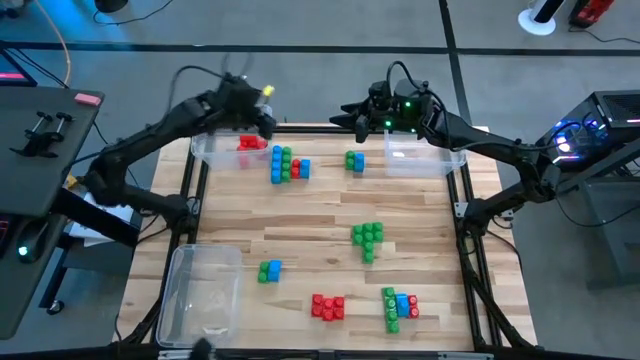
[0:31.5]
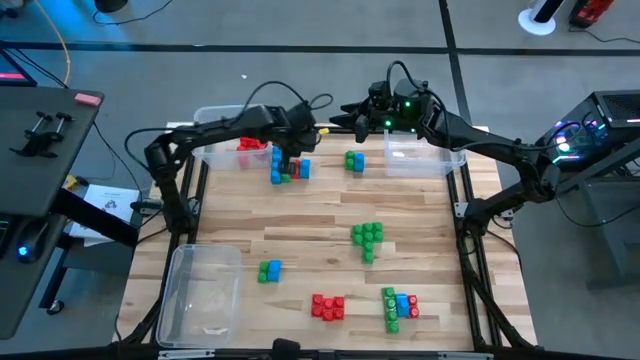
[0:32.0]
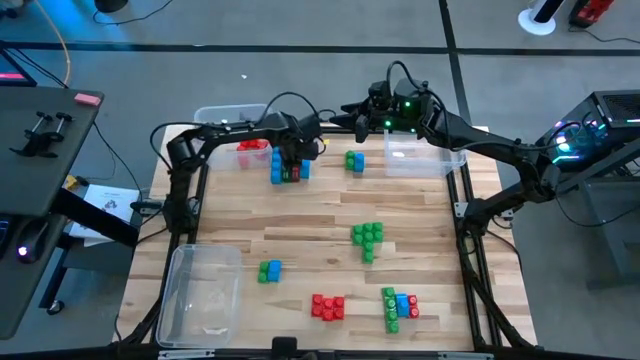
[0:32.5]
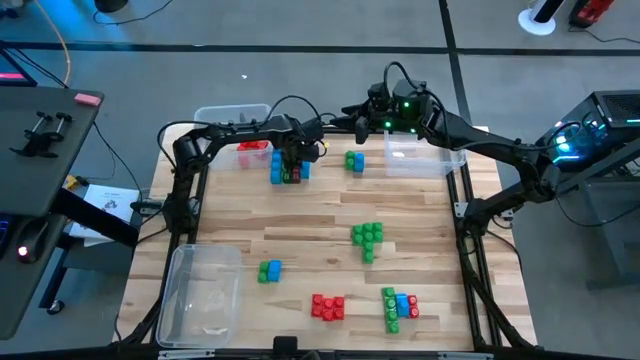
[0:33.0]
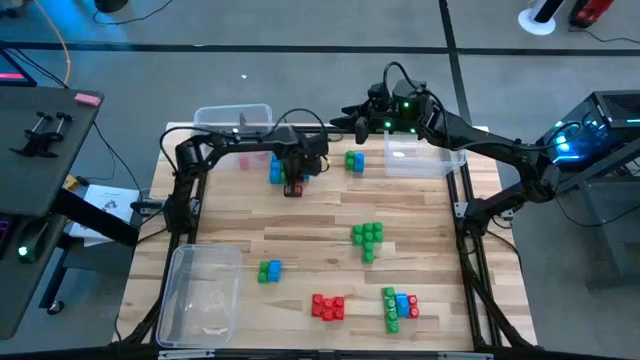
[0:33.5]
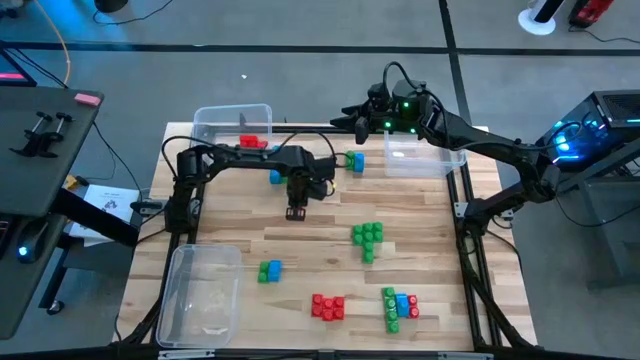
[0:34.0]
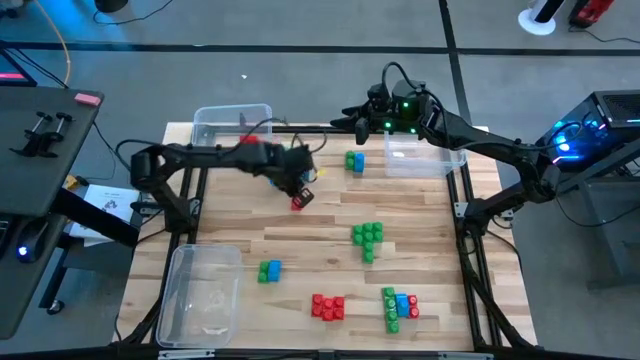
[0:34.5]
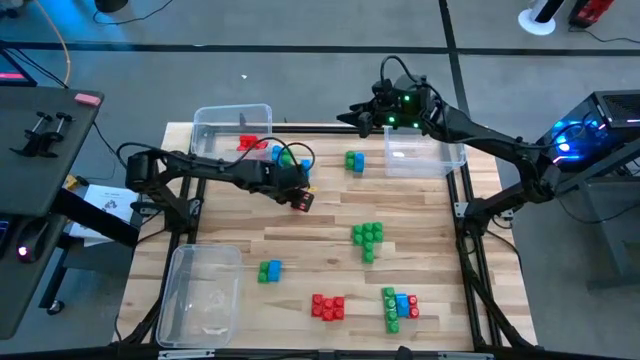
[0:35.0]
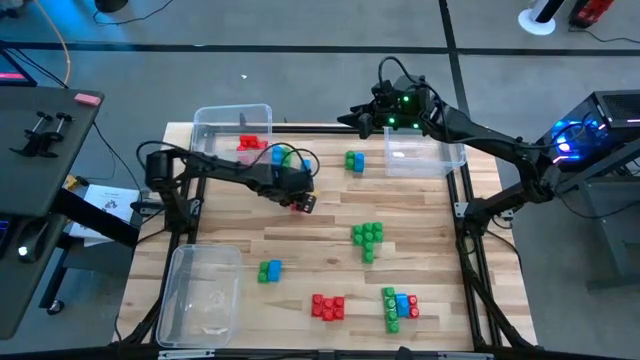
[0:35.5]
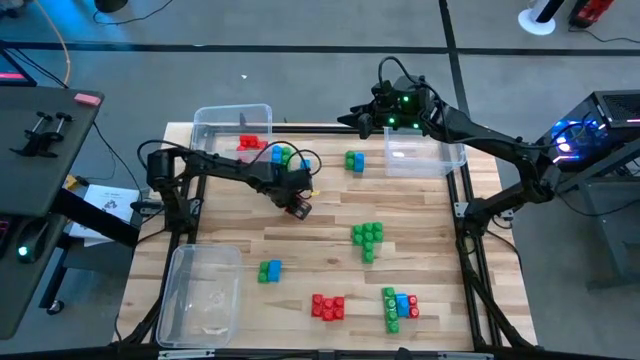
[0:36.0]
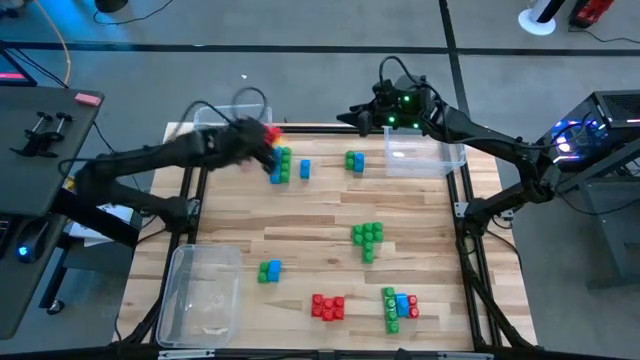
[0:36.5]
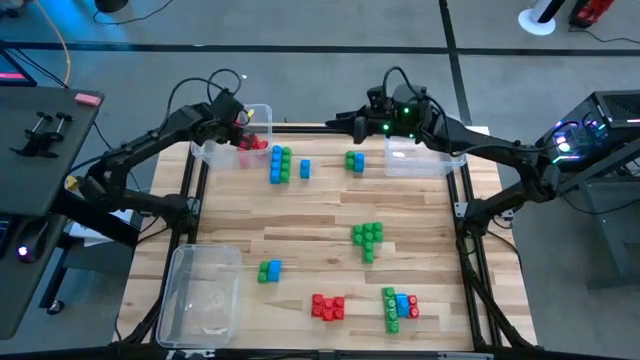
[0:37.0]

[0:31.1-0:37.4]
Task: Sort blocks
Put the red game piece into the top left transparent bin

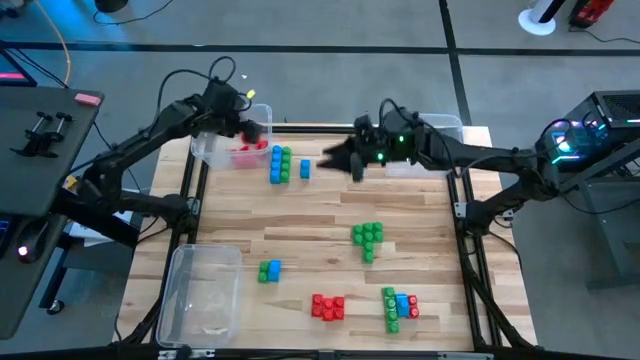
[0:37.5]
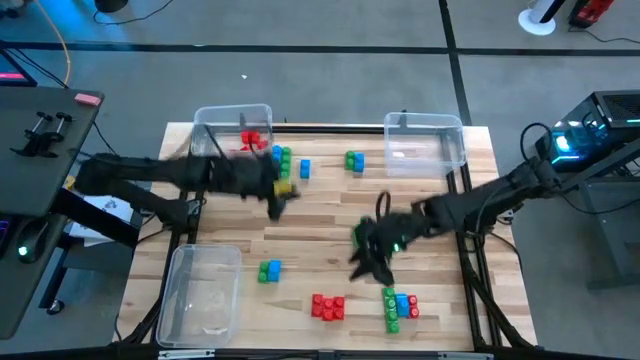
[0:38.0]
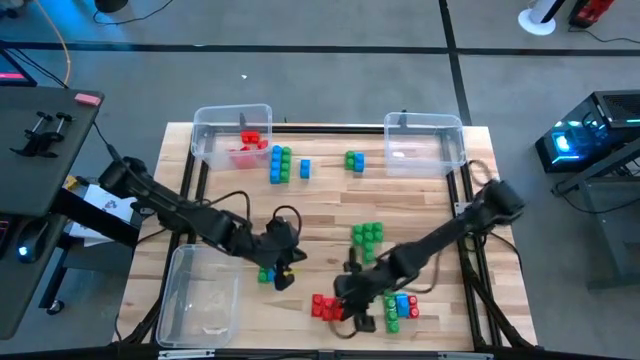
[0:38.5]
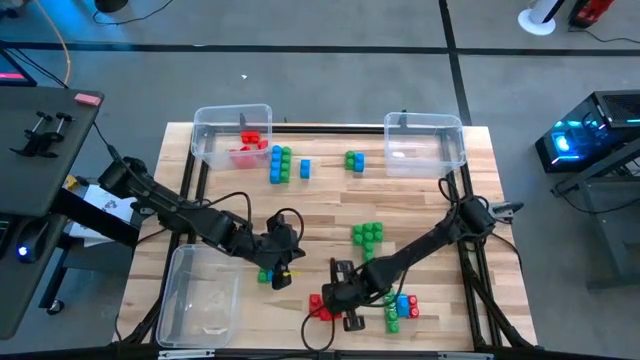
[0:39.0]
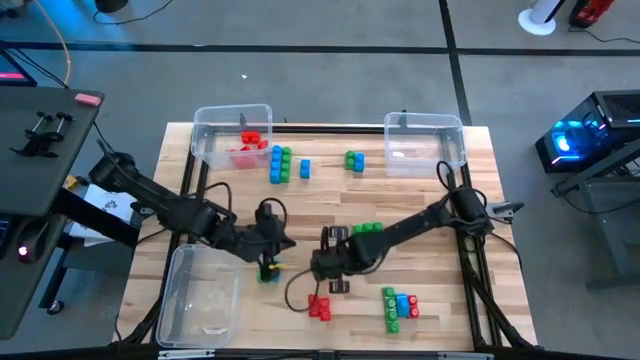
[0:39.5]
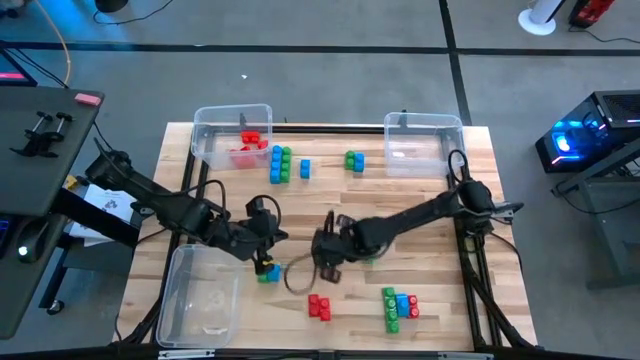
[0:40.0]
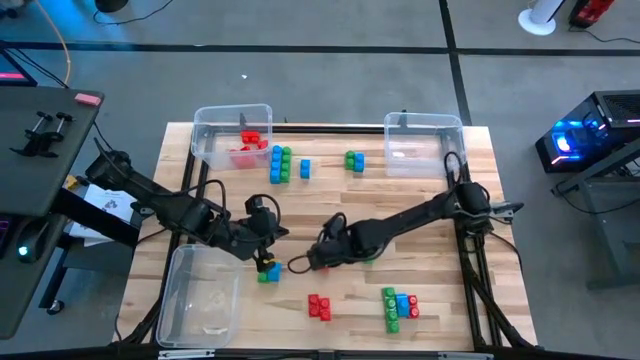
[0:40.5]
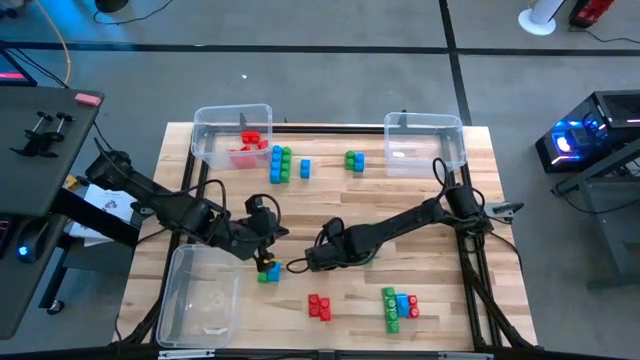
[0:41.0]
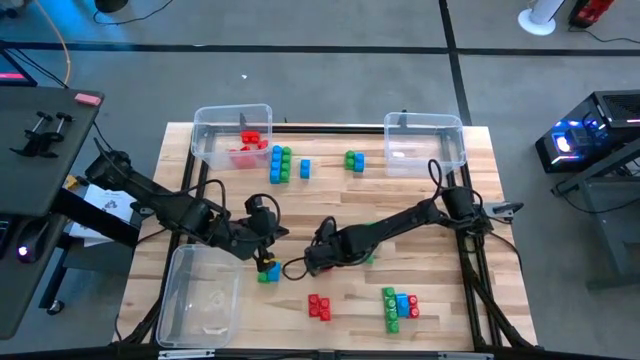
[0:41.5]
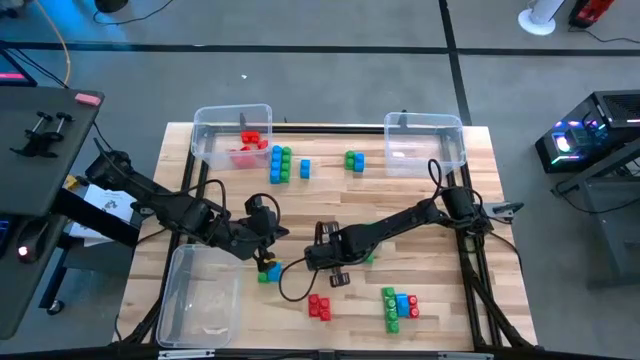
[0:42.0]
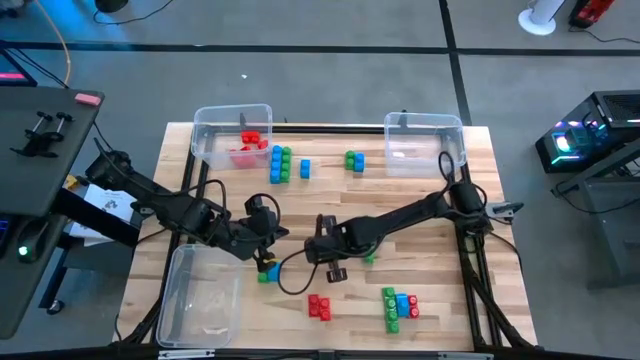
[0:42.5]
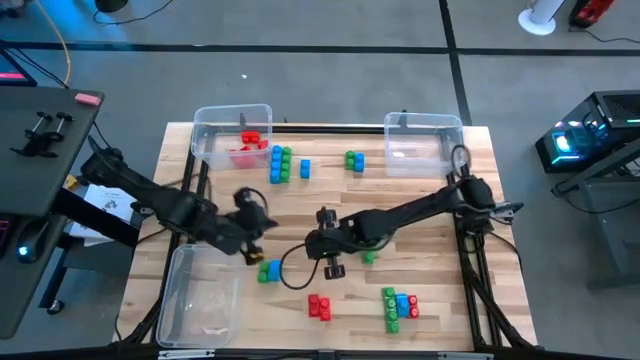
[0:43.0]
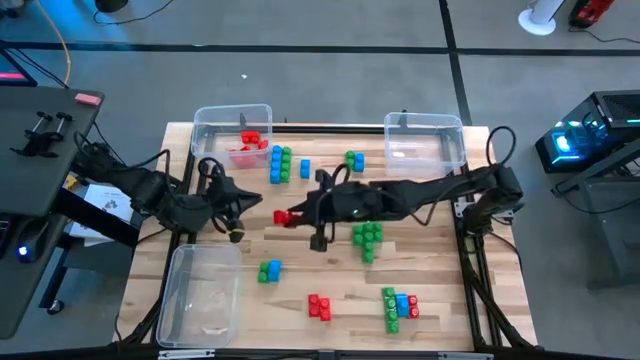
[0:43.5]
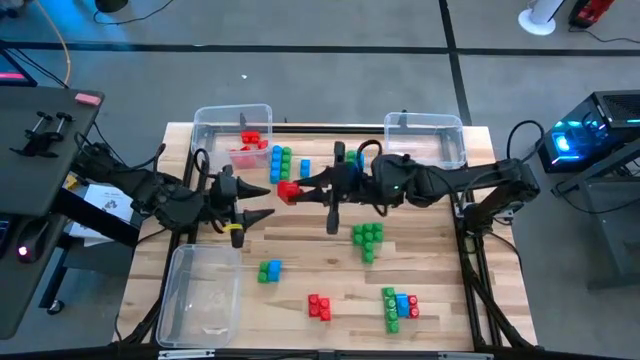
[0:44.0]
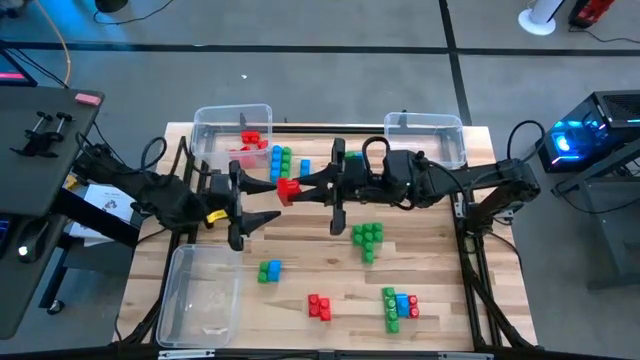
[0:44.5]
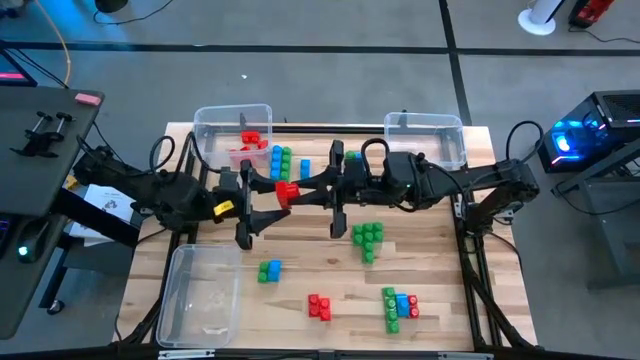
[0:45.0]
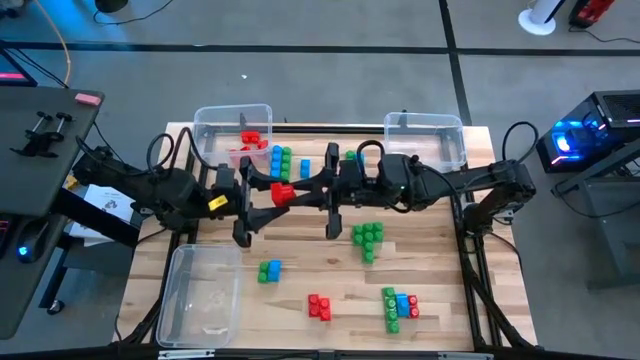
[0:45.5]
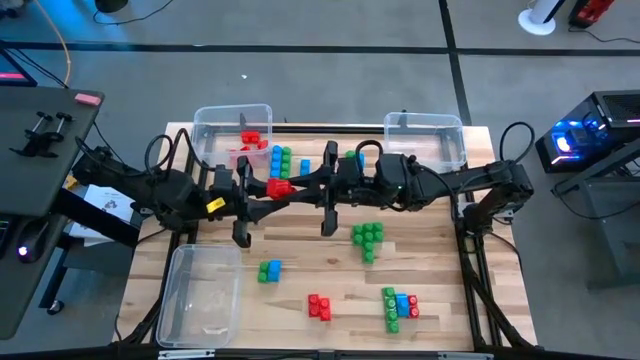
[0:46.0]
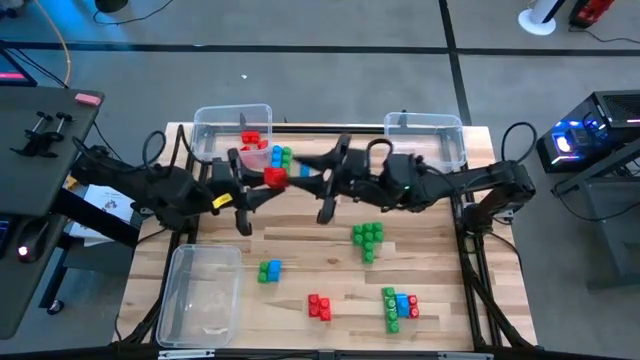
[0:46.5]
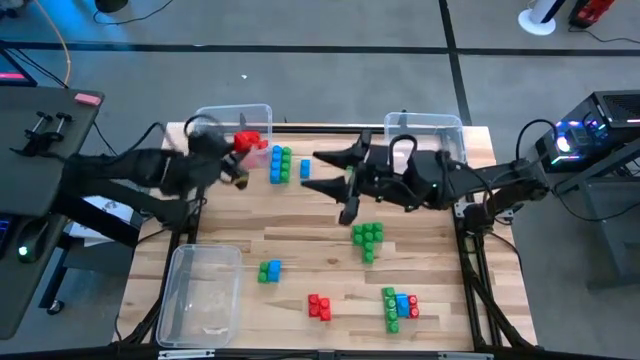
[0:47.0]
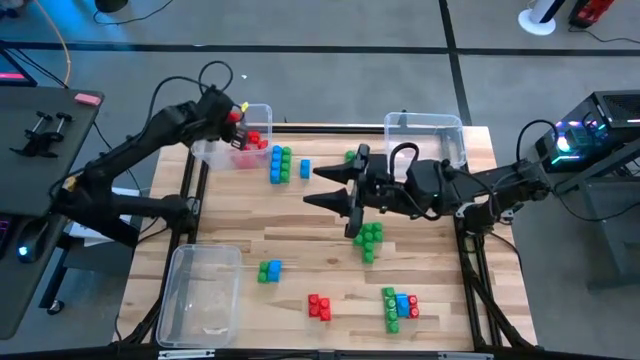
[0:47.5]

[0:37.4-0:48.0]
Put the red game piece into the top left transparent bin

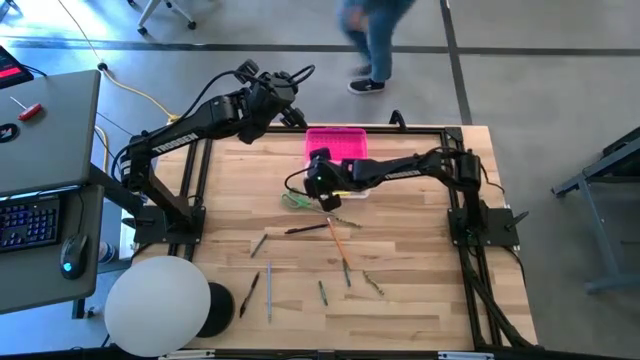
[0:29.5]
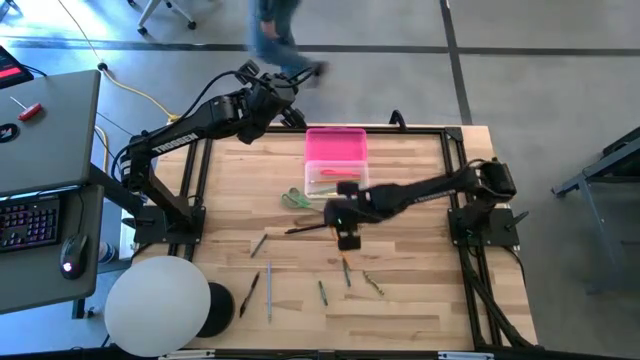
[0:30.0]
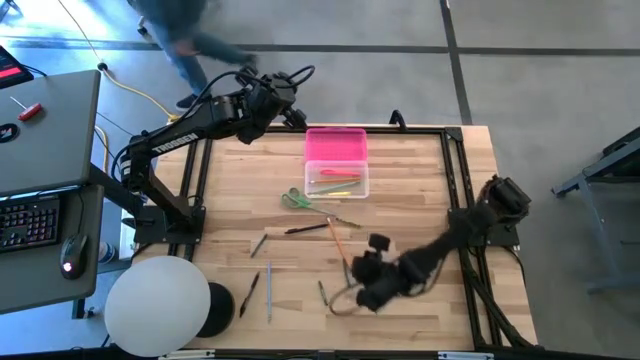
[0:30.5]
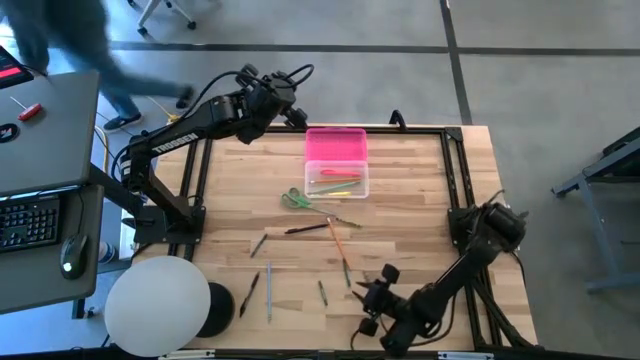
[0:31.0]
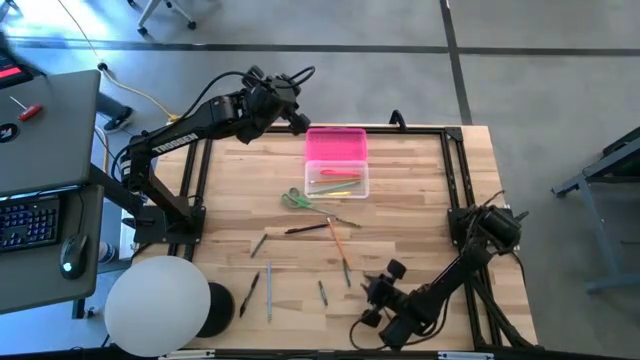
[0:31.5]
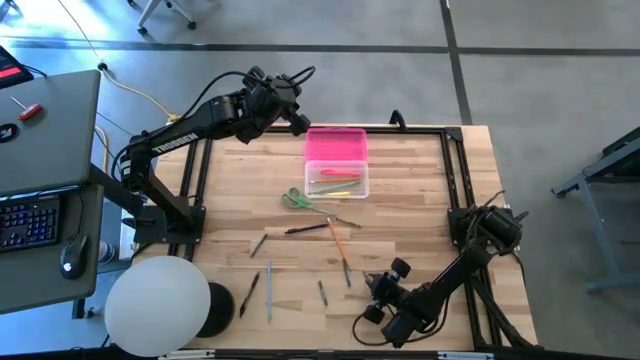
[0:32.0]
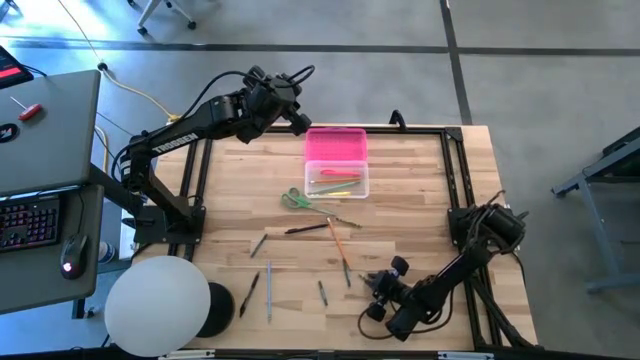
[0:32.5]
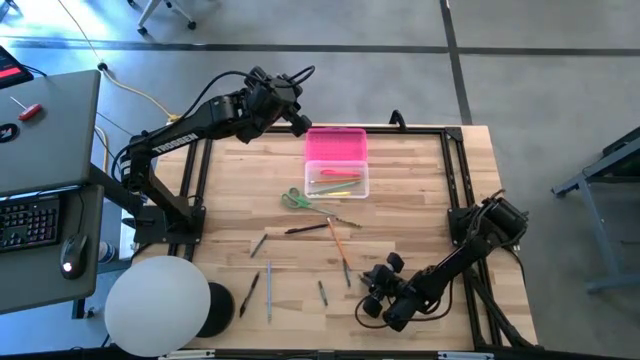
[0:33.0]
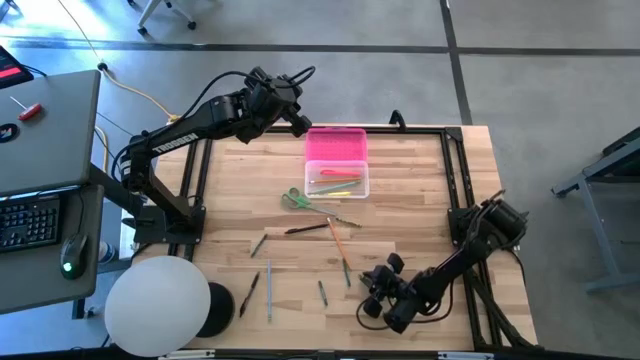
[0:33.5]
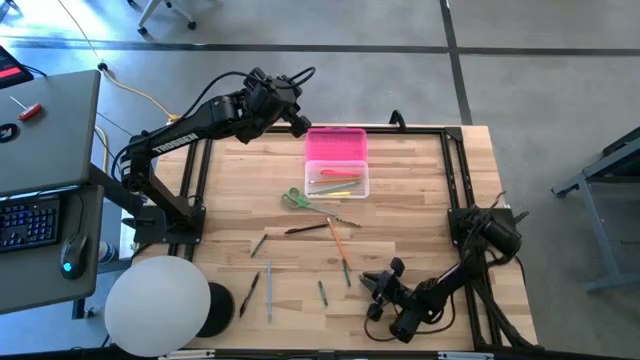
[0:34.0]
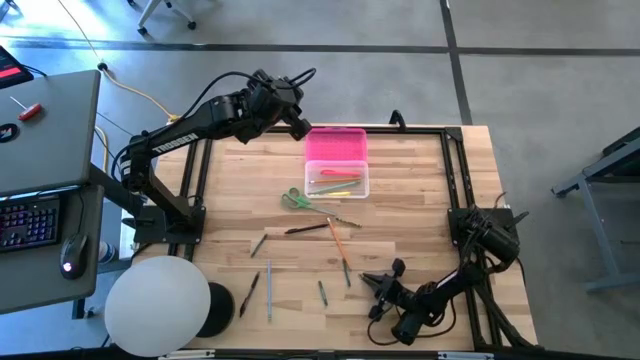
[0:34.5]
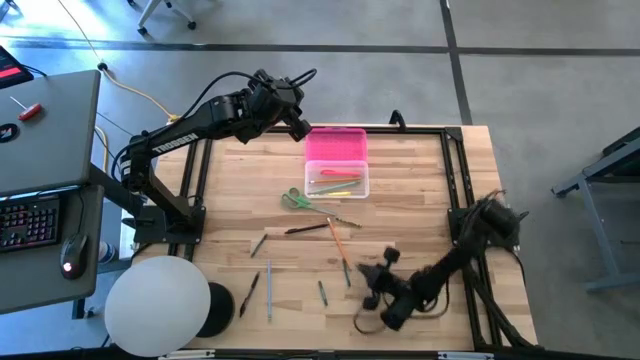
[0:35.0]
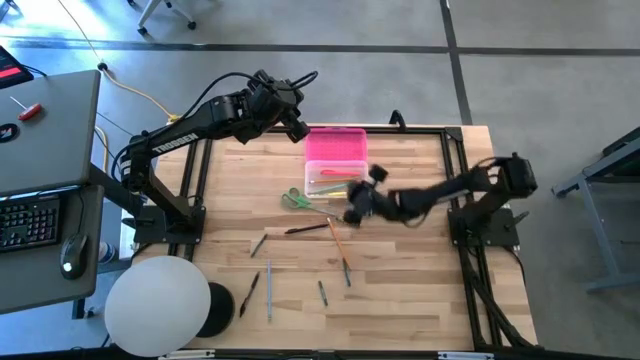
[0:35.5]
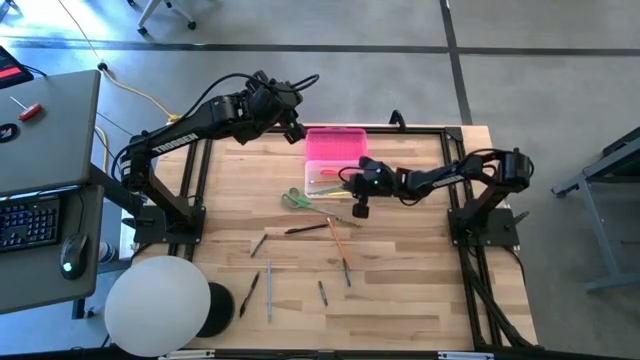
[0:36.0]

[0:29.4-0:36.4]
Task: Pick & place school supplies into a supply box
Put the bottom green crayon into the supply box
